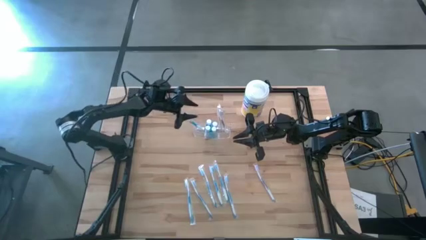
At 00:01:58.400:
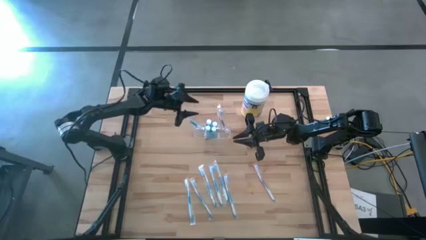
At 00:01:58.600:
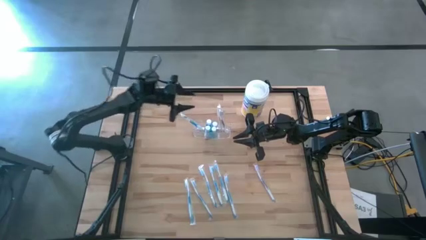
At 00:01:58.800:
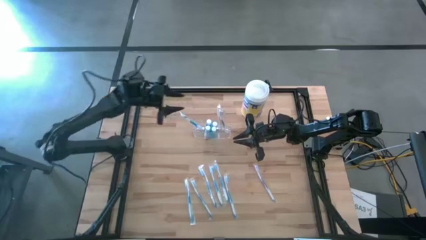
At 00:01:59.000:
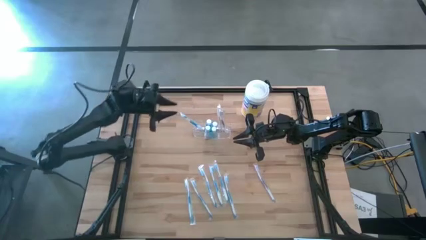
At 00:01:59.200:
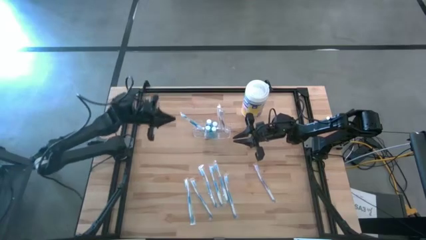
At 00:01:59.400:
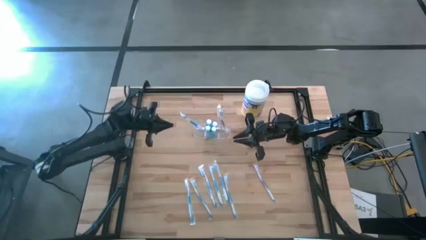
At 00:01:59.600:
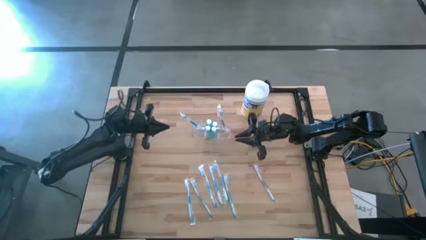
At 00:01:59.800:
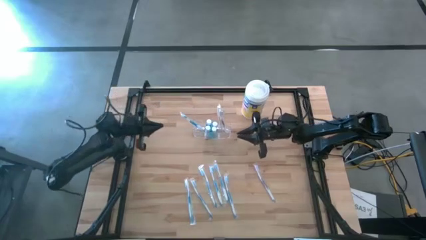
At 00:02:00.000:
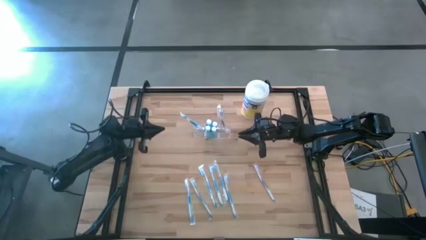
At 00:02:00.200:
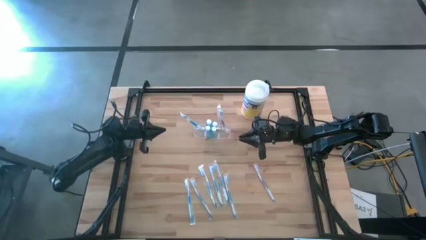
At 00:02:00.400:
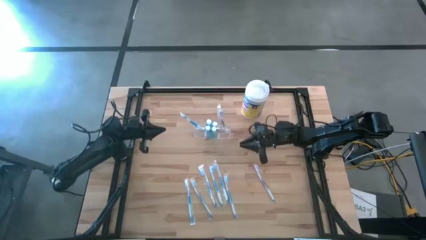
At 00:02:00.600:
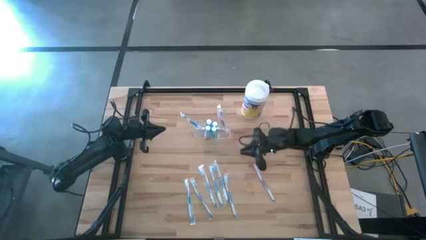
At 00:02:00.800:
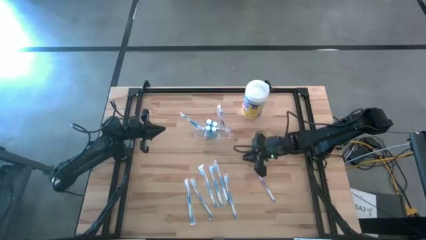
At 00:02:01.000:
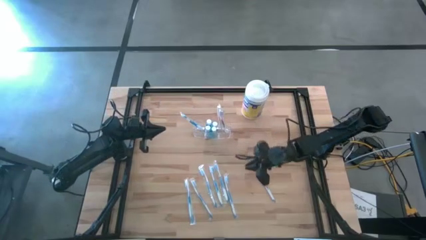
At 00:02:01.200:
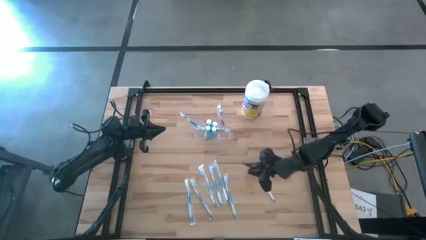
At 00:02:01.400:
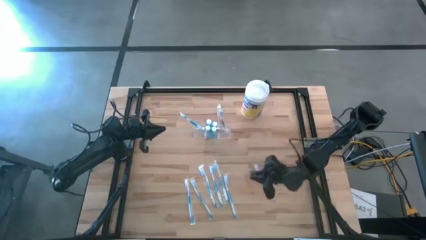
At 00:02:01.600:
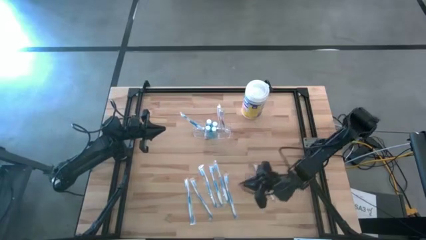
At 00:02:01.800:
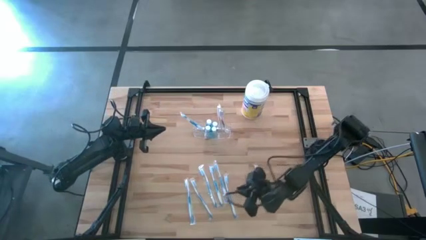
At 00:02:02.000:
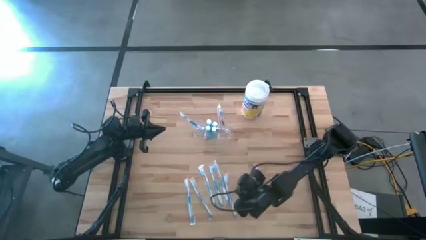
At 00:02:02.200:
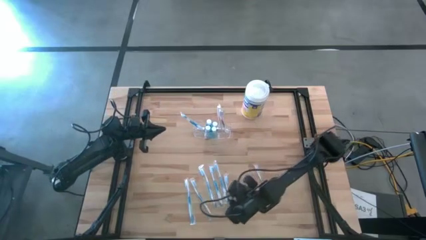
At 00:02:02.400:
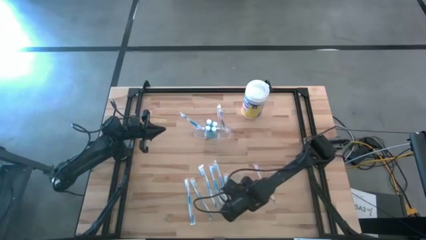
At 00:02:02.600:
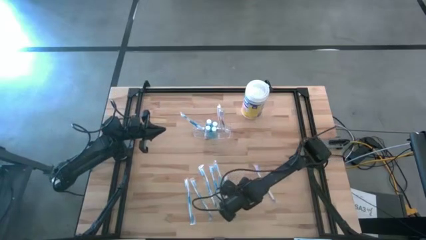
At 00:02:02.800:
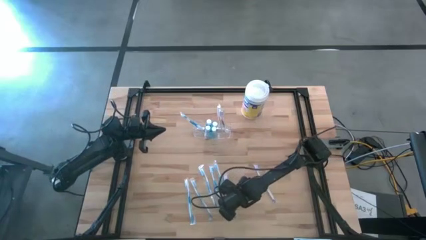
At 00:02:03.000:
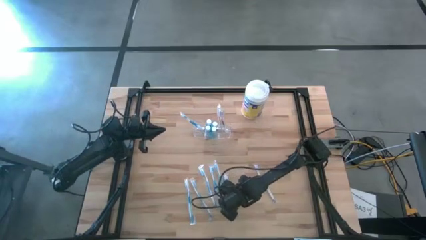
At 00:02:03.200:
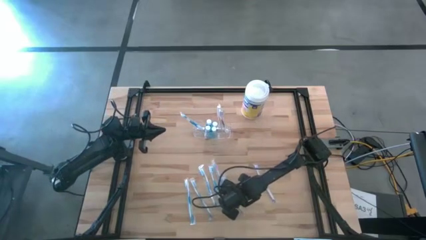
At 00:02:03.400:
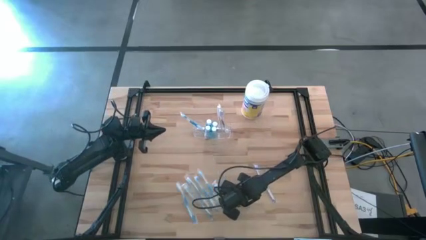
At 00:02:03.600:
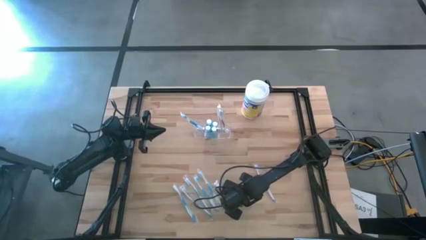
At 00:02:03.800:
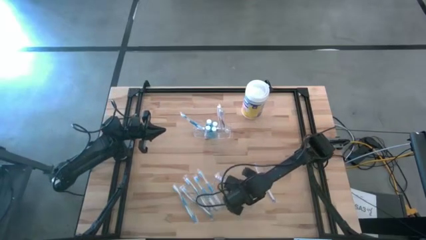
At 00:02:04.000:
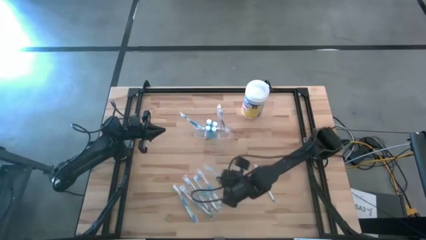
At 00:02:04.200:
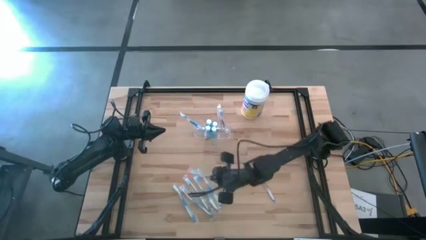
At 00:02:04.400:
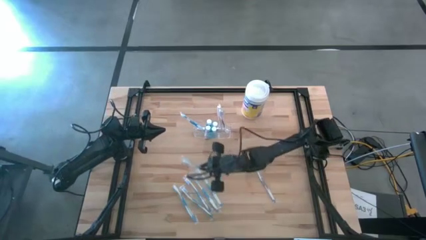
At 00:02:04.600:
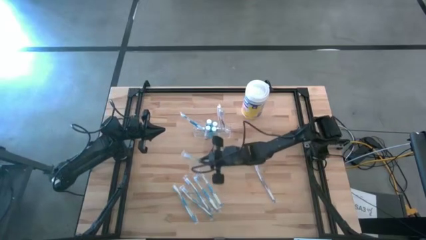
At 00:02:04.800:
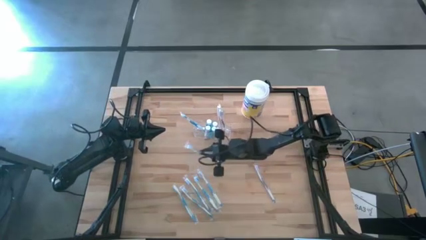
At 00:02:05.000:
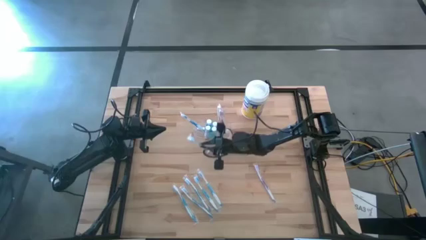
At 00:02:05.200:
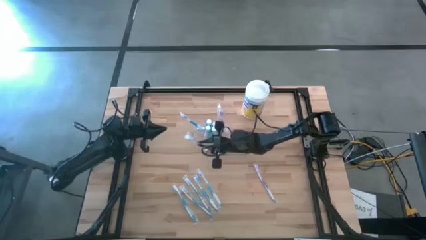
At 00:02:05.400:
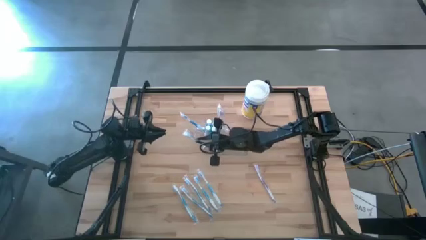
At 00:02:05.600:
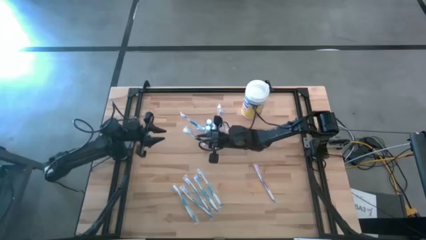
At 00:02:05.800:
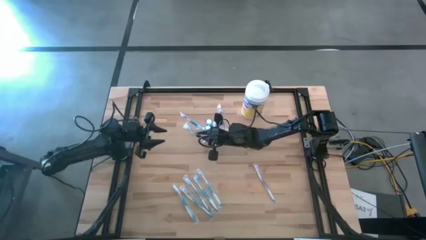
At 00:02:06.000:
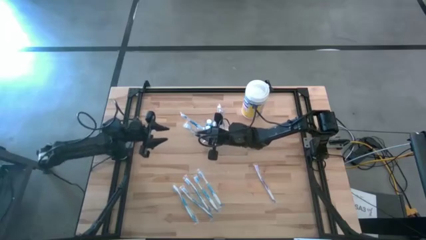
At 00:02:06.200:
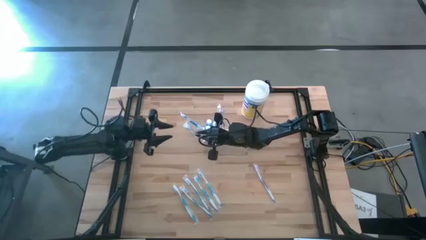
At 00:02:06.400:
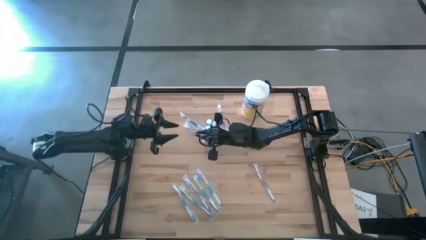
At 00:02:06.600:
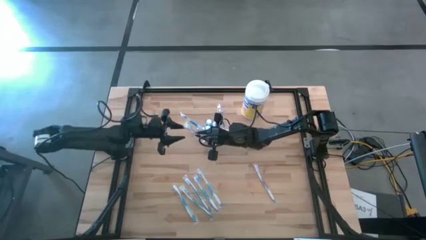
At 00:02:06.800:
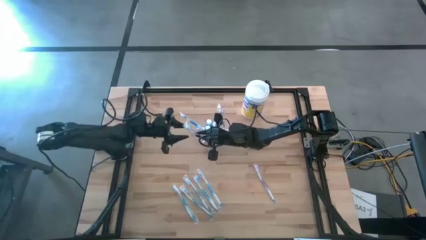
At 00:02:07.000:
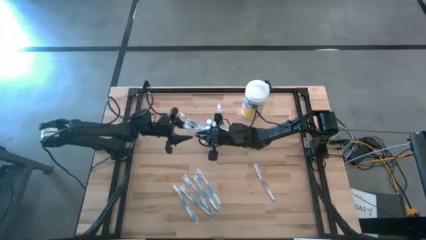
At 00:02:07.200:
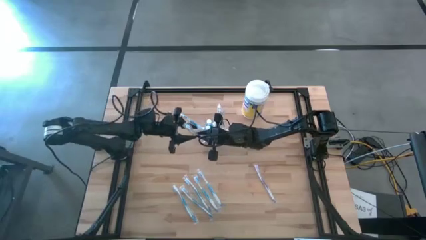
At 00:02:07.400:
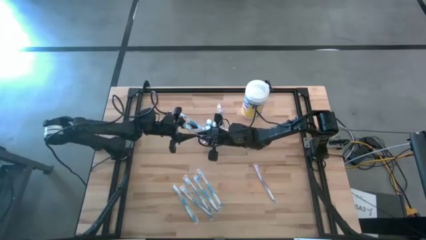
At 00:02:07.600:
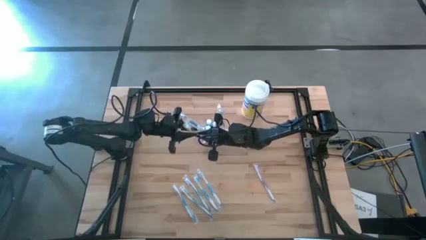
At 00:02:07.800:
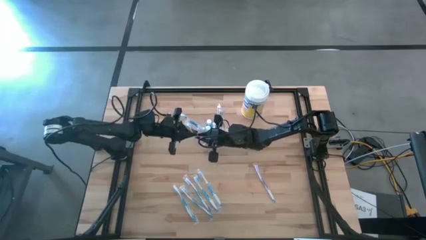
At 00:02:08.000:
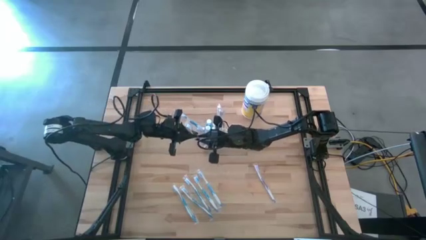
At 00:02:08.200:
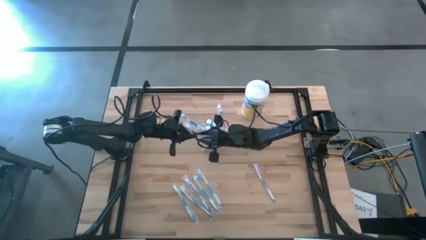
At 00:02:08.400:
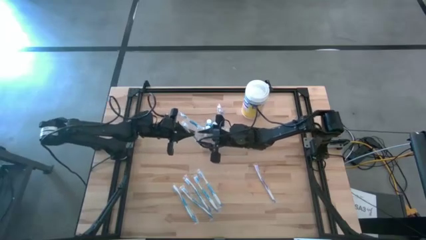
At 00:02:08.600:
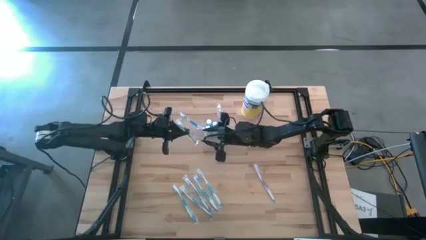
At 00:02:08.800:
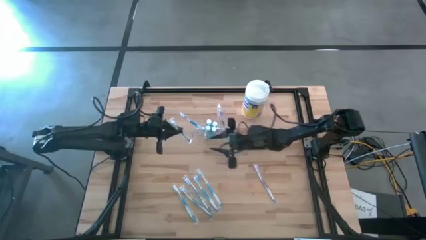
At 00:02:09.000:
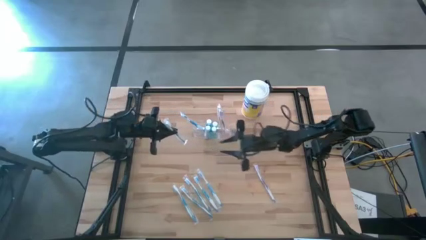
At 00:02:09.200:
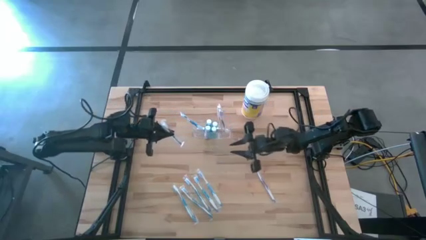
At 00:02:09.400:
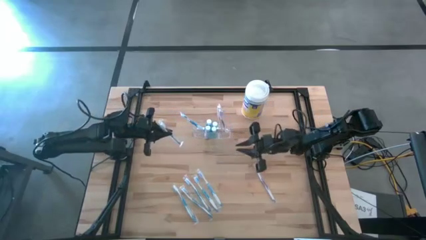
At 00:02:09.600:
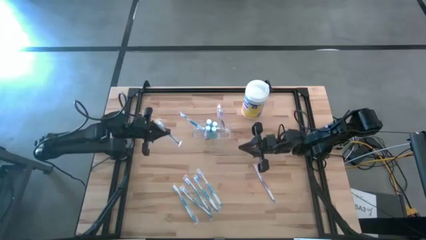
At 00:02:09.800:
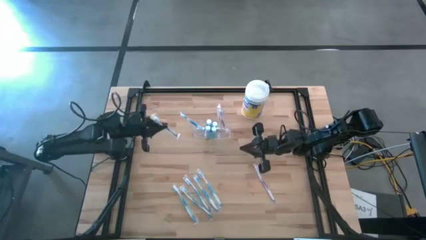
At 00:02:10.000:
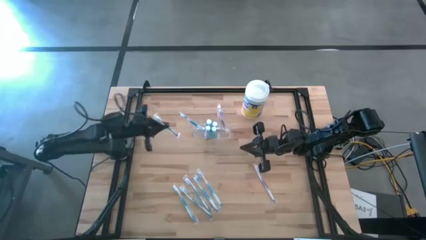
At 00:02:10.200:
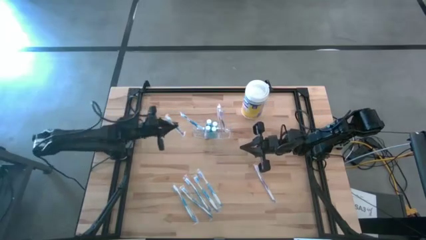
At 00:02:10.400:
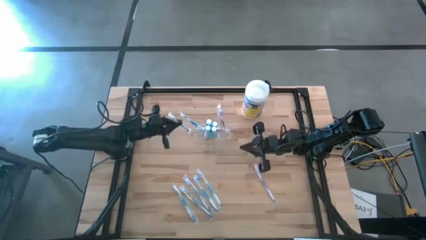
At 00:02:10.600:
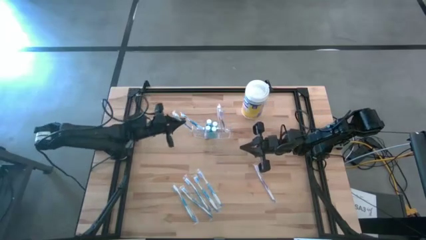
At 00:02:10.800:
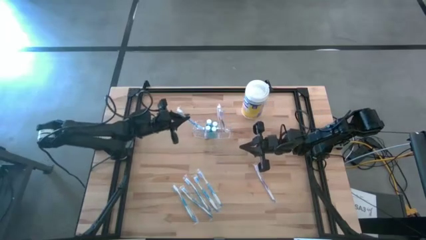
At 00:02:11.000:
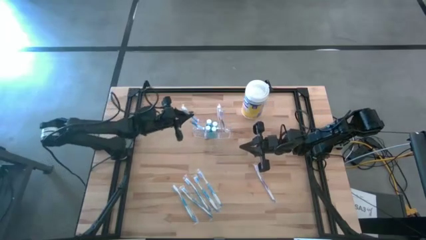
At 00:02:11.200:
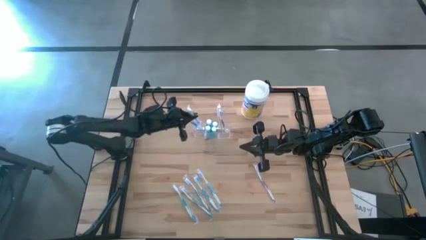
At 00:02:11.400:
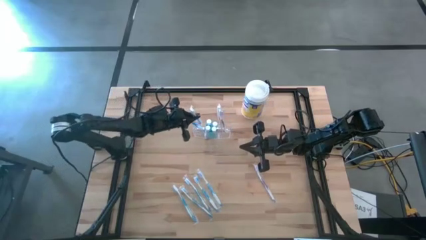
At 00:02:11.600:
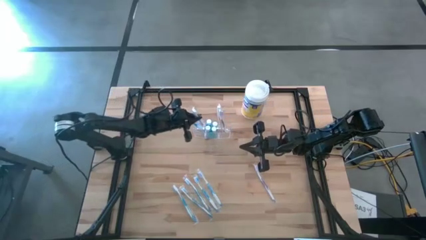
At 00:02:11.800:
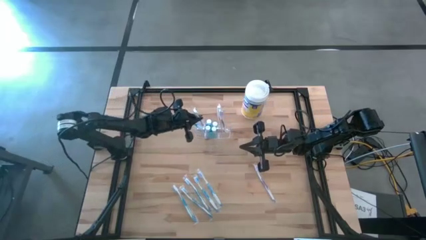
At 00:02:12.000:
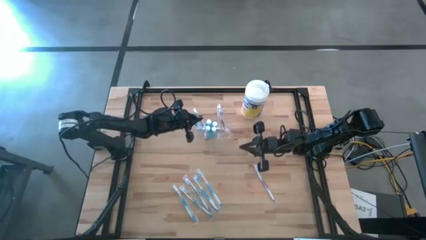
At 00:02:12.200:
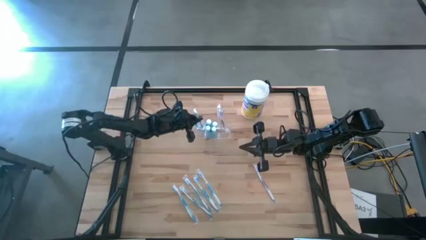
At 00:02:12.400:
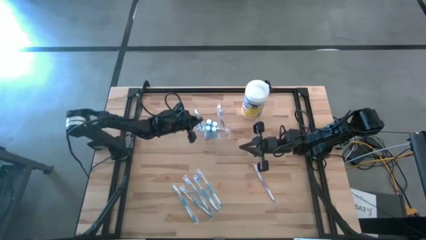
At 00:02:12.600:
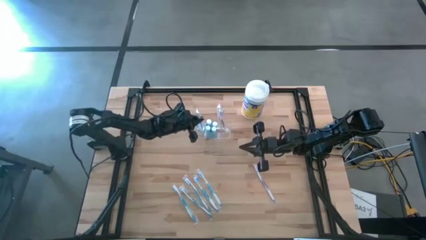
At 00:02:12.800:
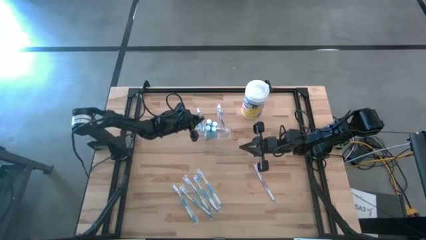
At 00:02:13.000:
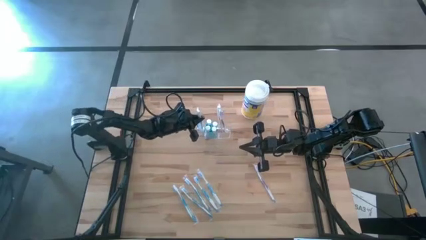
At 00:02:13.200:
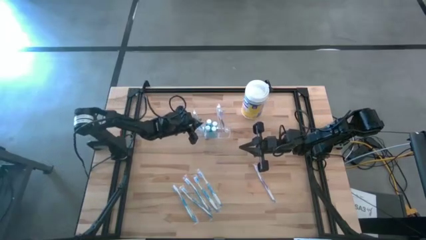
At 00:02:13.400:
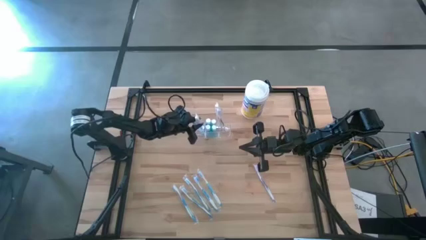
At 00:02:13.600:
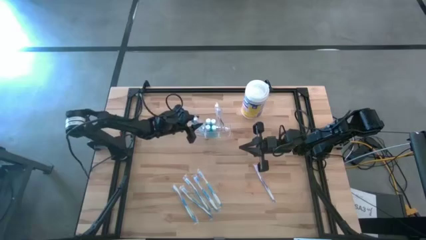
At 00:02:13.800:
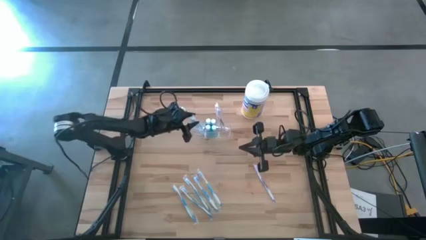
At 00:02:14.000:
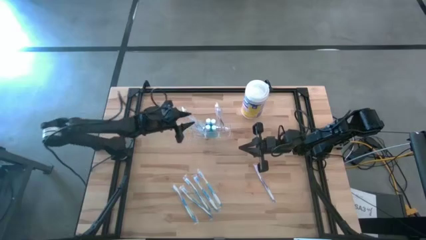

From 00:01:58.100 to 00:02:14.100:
Task: Pick & Place toothbrushing station
Put the blue toothbrush into the transparent organizer
